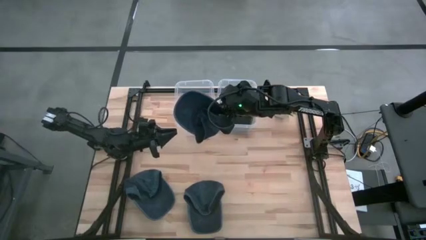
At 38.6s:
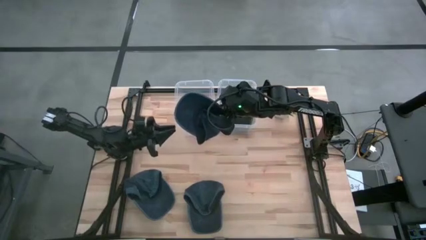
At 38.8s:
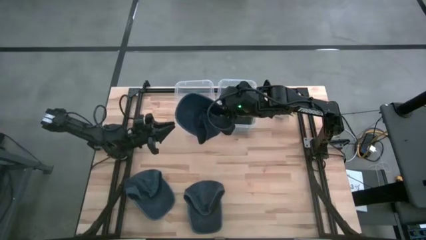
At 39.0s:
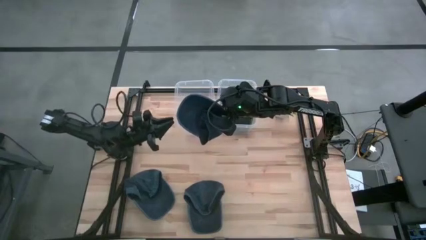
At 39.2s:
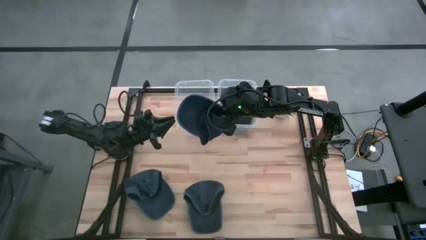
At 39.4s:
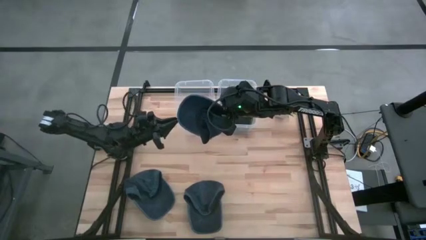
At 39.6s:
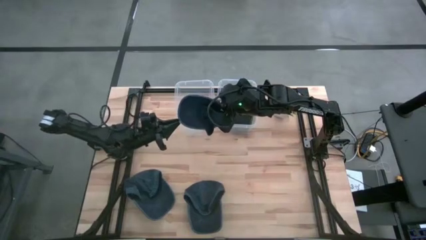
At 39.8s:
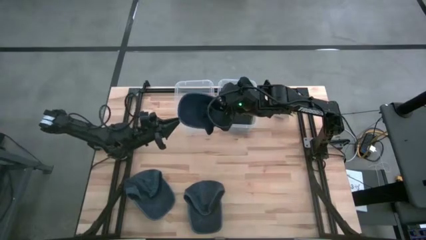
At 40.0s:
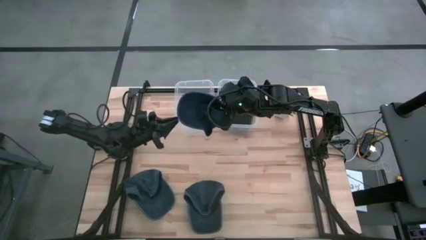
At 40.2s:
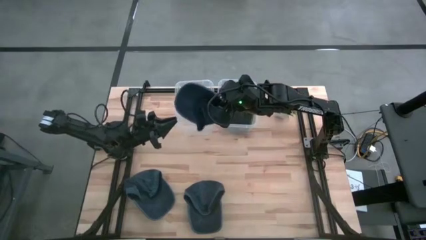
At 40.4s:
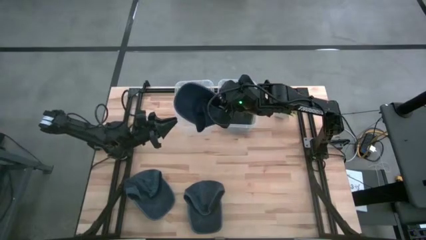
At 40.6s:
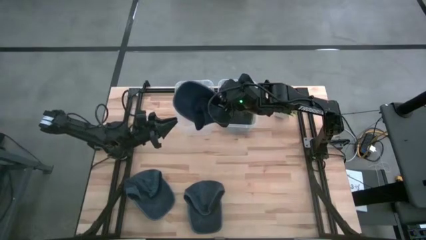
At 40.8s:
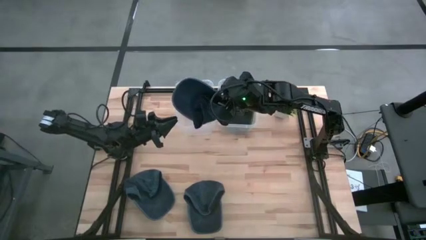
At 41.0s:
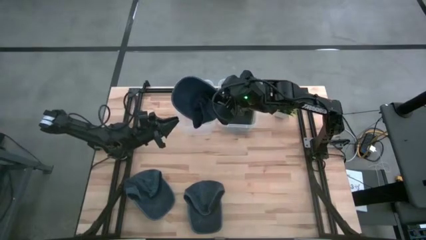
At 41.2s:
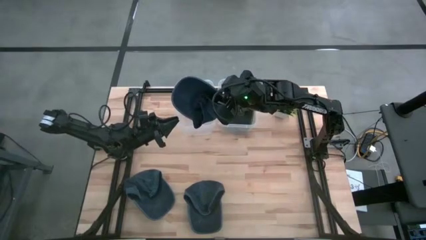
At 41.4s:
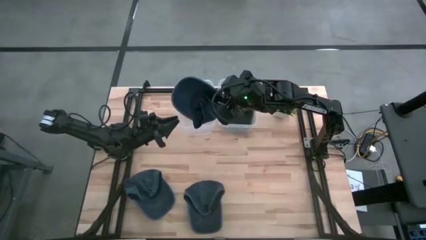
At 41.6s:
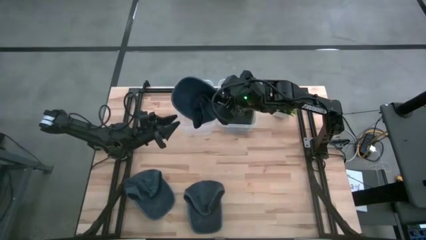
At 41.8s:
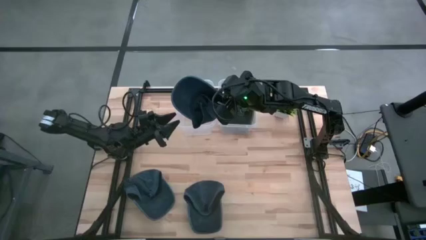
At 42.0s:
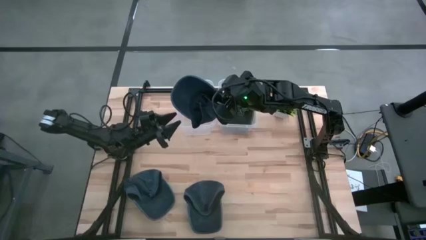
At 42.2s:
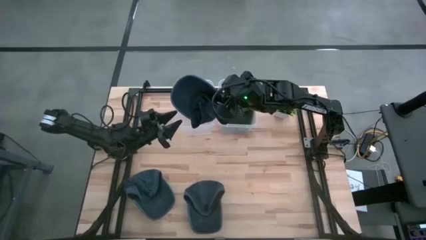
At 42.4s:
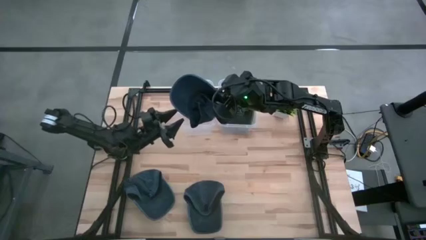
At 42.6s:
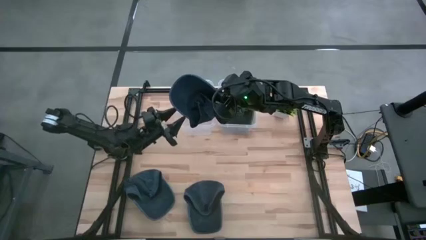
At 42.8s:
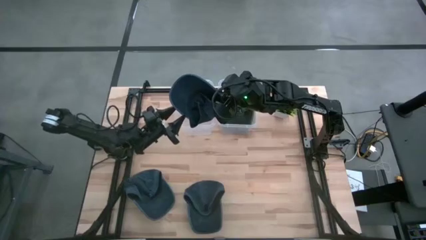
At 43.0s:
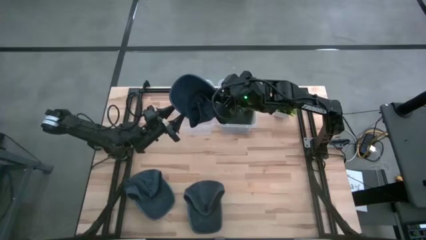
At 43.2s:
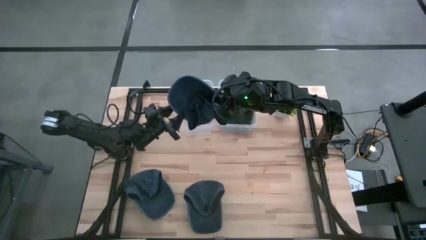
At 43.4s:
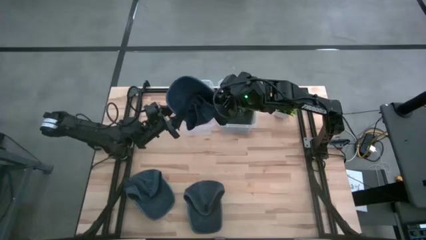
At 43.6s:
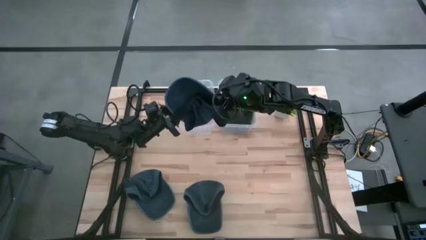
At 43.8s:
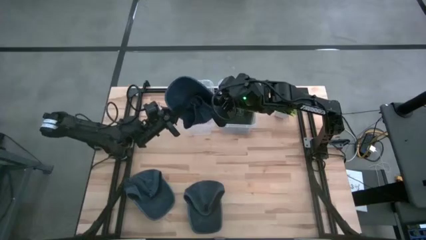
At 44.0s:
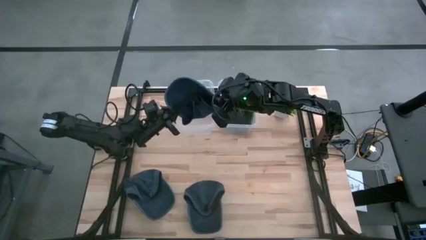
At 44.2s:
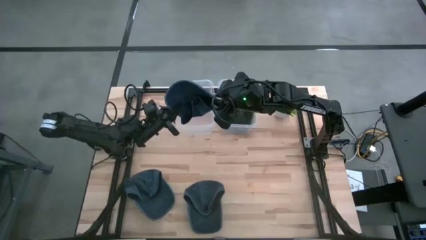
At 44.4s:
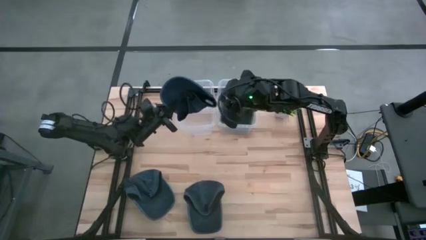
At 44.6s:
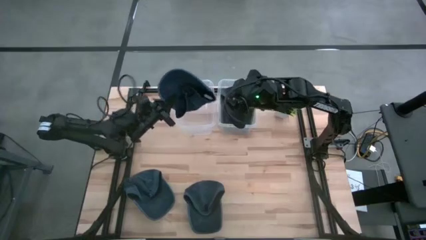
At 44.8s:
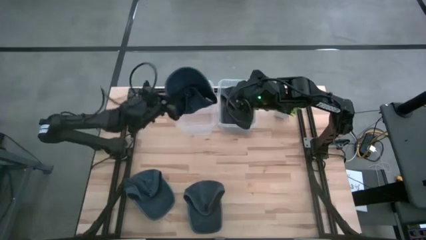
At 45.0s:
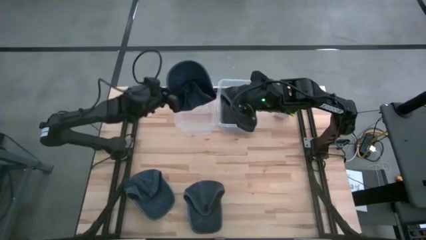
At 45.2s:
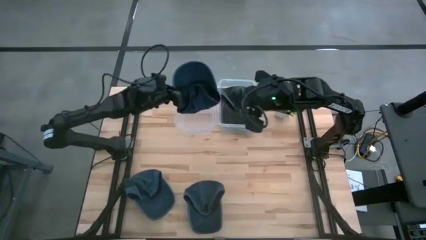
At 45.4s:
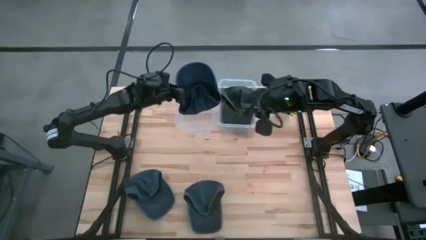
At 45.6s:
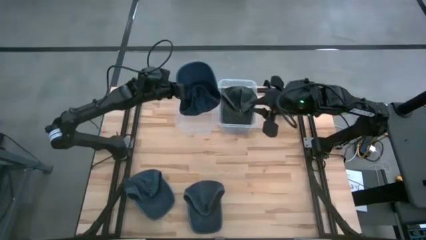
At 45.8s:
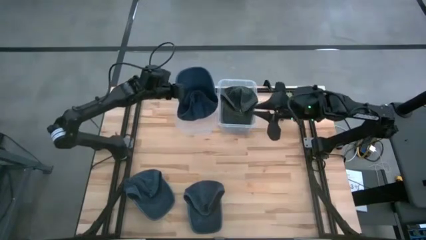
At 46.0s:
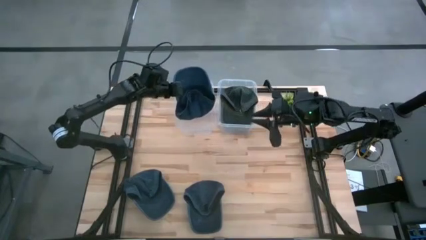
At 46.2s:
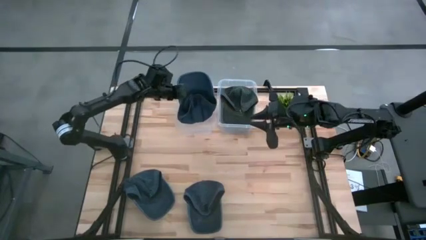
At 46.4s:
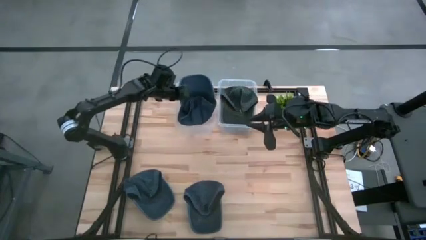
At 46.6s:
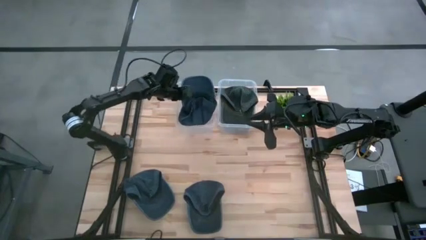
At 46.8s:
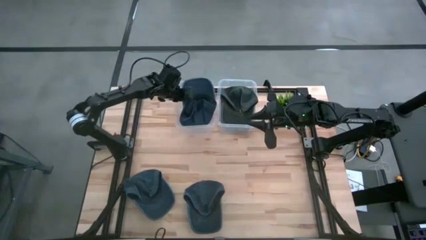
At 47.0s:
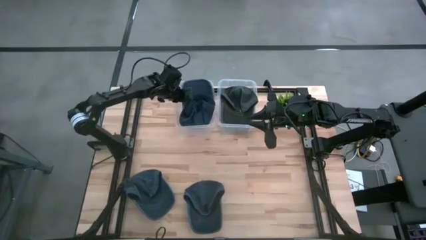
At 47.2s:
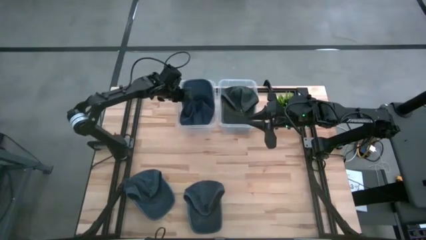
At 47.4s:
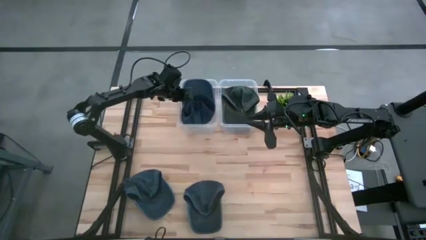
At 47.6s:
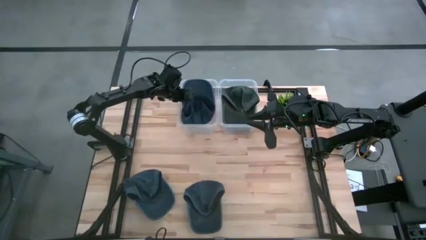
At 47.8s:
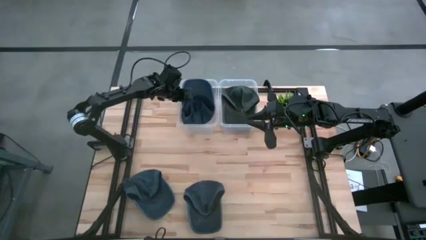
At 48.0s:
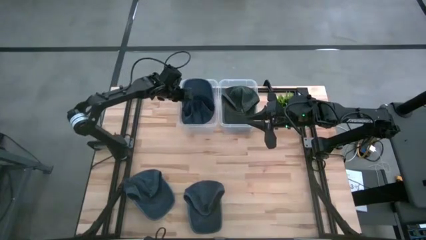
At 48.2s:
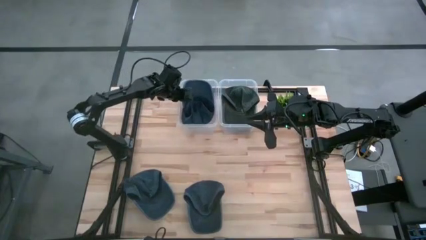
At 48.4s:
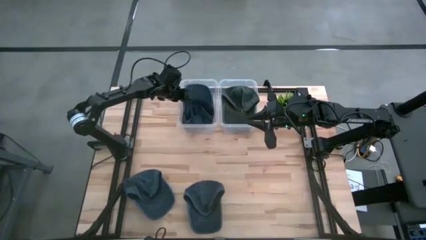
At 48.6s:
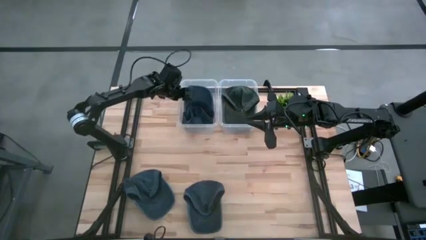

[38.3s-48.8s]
Task: Pick & Place hat
Put the right blue cap into the left transparent bin

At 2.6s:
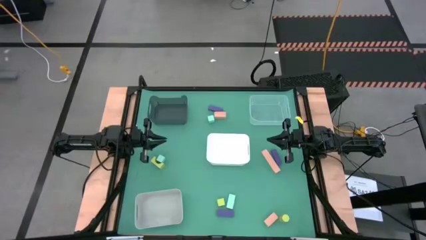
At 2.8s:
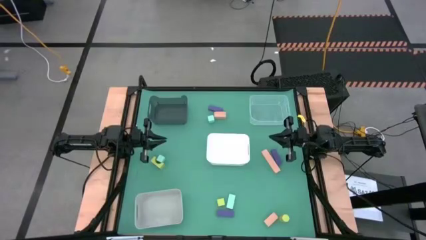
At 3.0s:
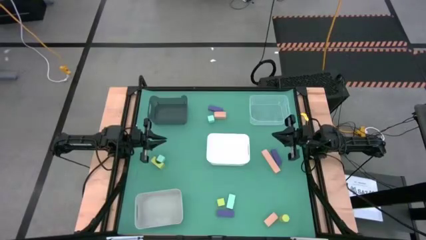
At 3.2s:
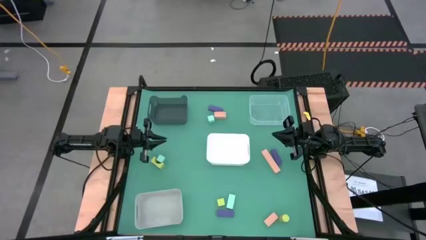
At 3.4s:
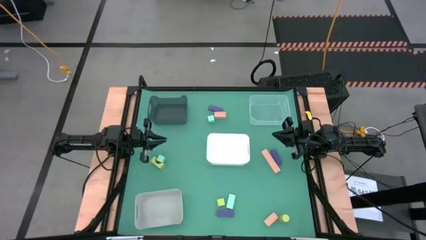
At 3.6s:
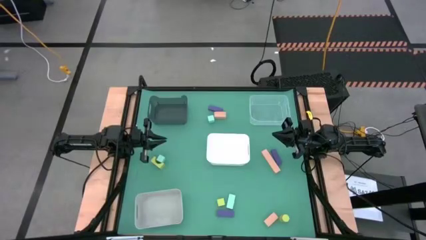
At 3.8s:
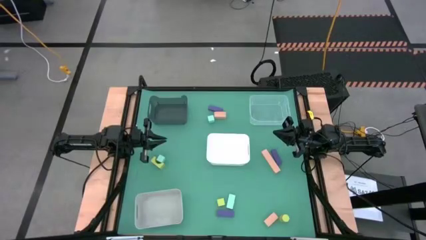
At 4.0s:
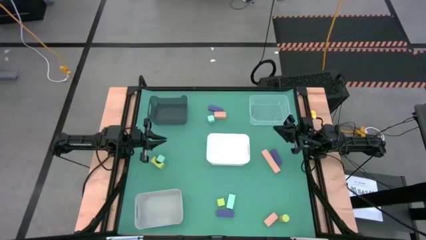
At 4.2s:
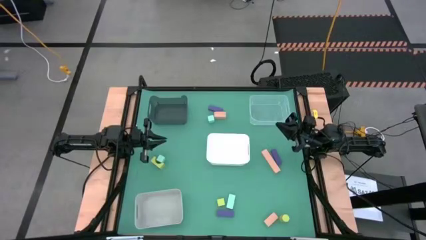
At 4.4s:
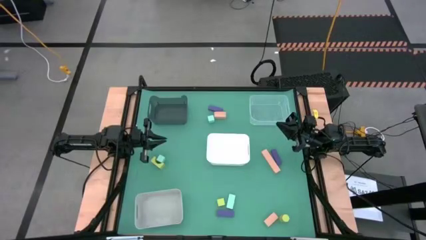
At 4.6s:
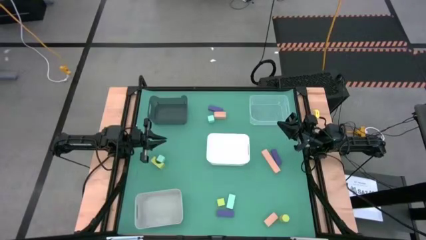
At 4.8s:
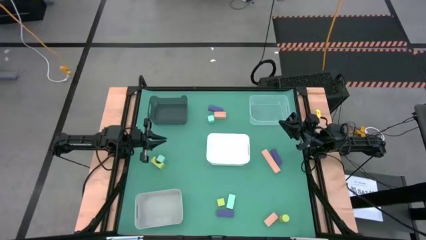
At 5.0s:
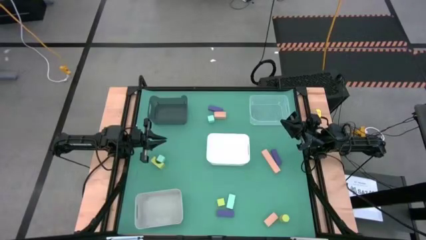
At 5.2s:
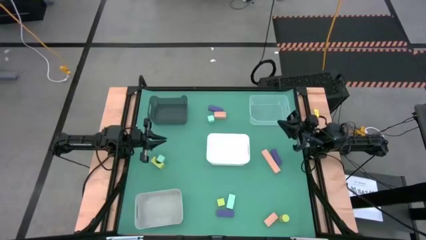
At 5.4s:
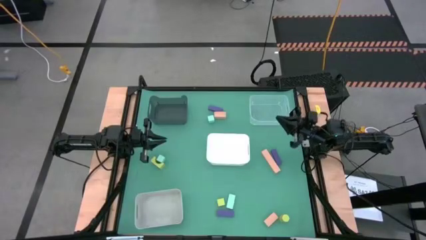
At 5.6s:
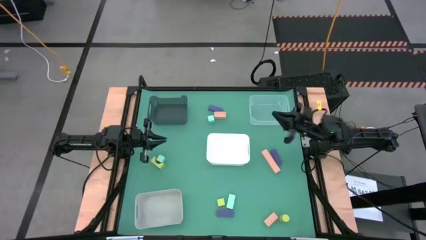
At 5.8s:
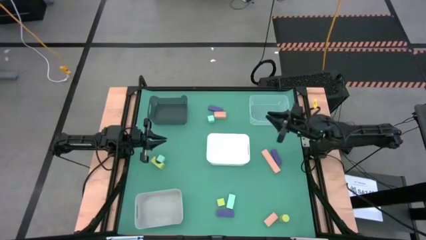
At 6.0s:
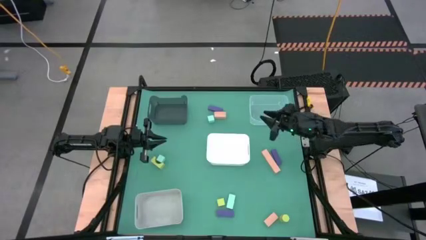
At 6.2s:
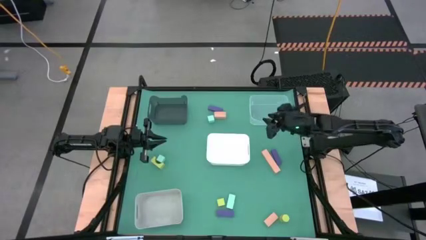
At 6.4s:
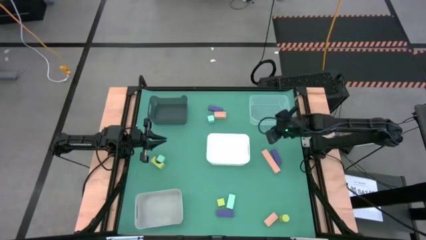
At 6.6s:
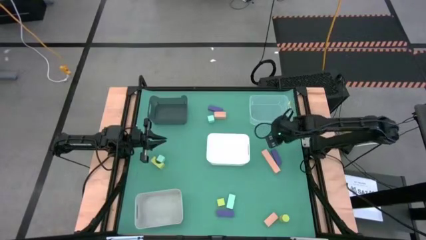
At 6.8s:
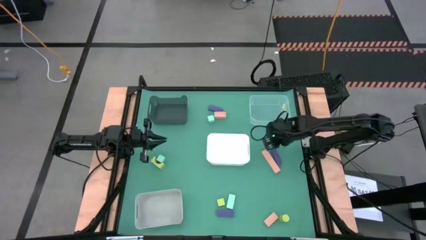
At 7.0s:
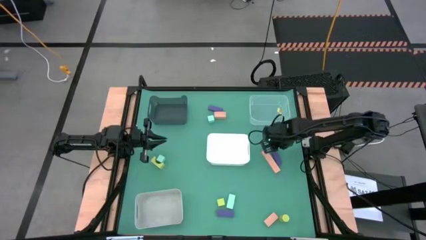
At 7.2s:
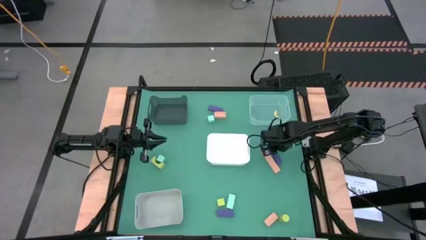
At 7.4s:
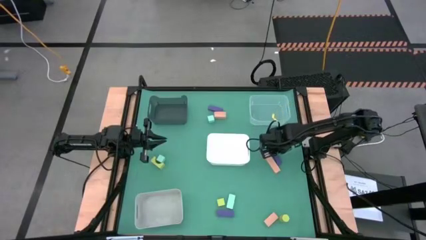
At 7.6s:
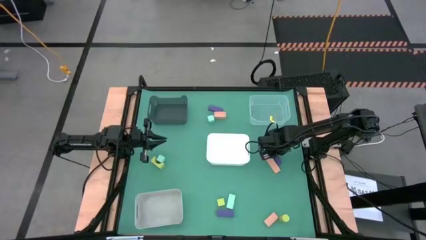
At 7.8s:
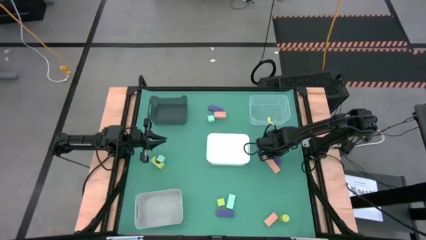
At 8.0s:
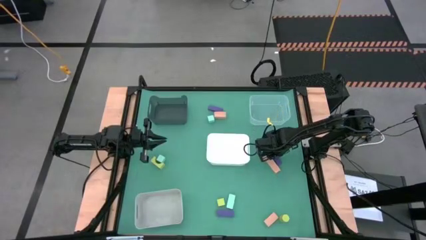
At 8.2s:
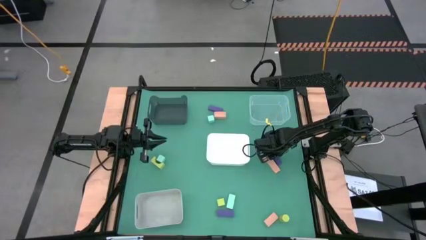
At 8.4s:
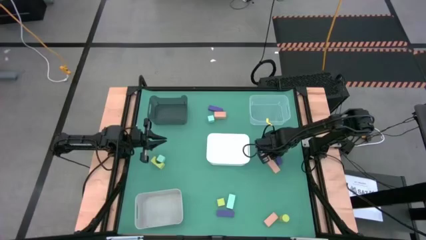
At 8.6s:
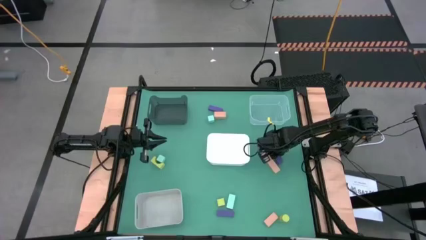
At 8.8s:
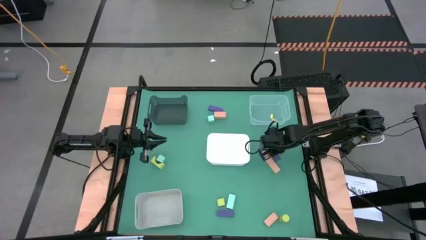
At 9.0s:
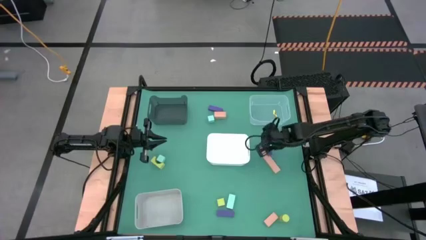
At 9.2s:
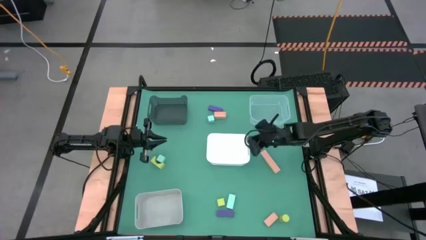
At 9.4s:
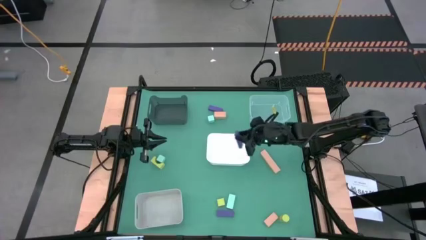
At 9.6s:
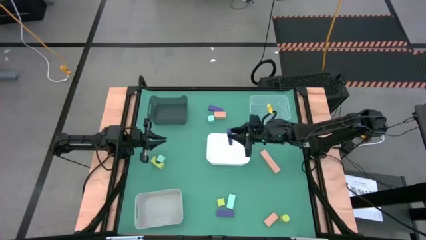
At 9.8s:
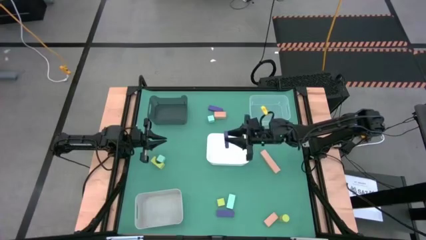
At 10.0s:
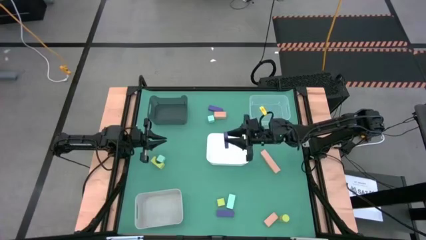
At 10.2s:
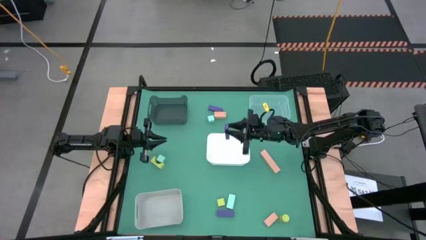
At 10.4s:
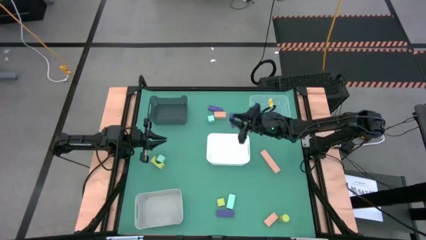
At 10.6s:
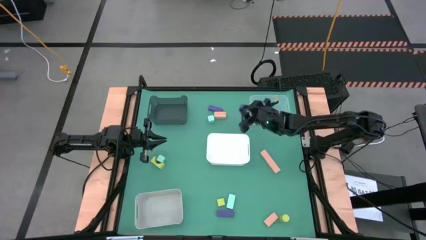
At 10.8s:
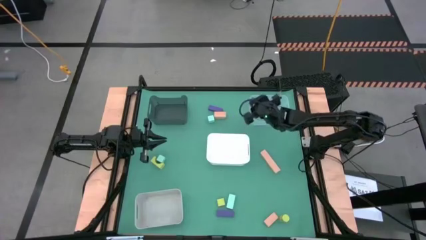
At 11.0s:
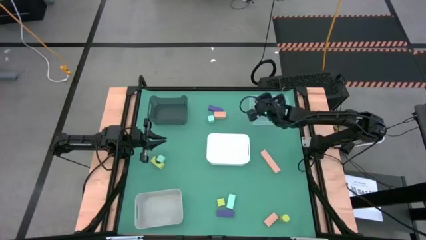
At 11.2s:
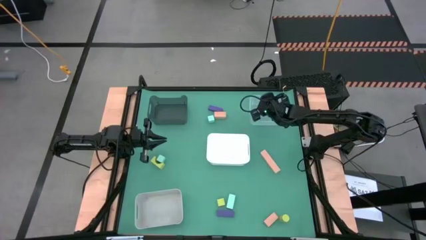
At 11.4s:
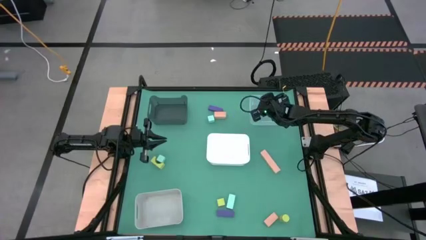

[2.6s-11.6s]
Task: Sort & place blocks by color
Put the middle right purple block into the transparent bin
